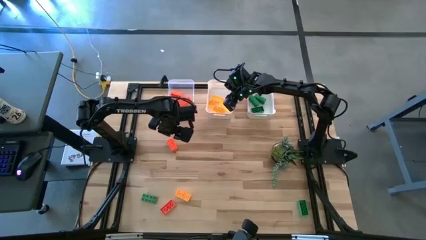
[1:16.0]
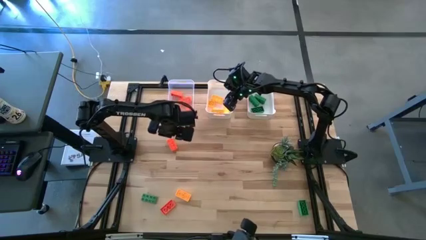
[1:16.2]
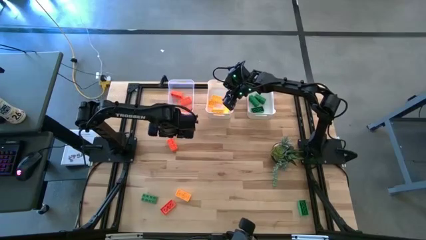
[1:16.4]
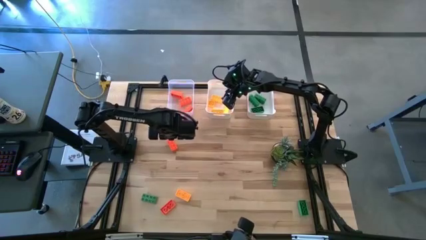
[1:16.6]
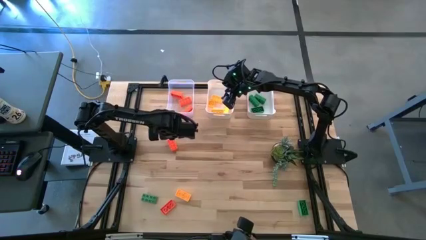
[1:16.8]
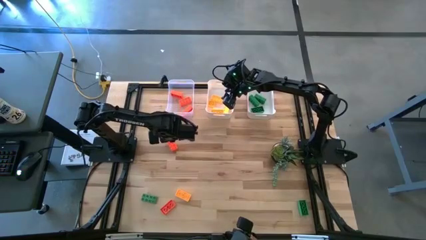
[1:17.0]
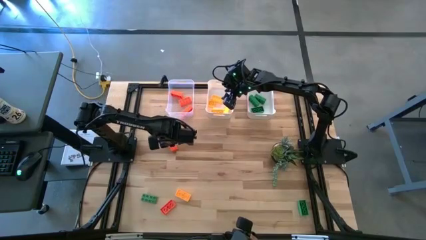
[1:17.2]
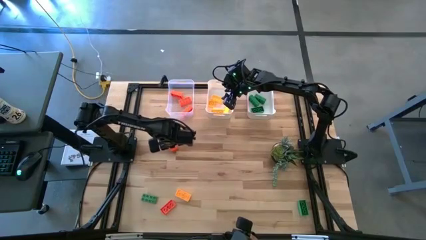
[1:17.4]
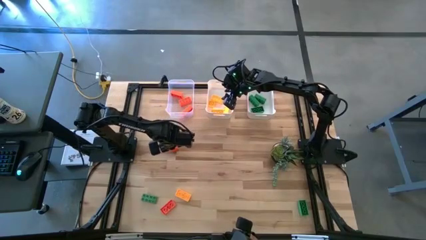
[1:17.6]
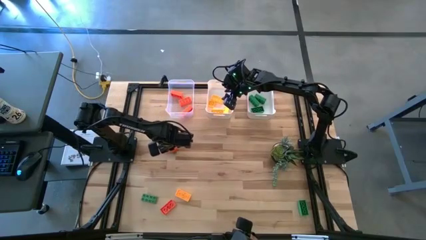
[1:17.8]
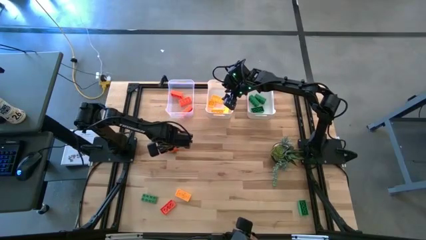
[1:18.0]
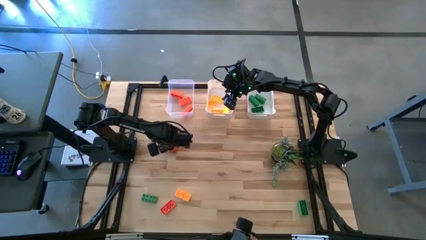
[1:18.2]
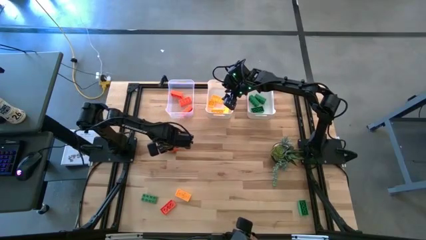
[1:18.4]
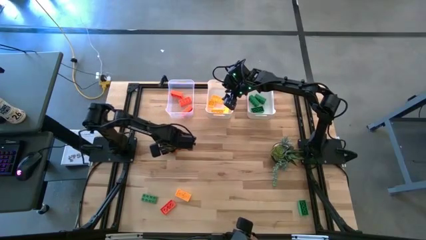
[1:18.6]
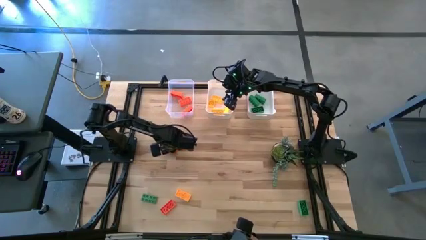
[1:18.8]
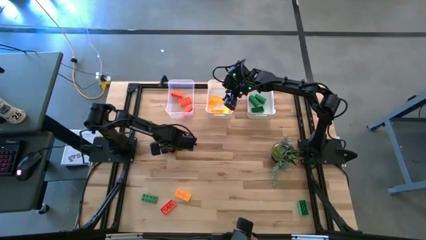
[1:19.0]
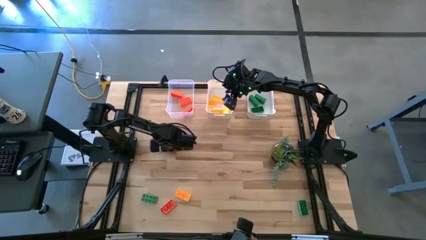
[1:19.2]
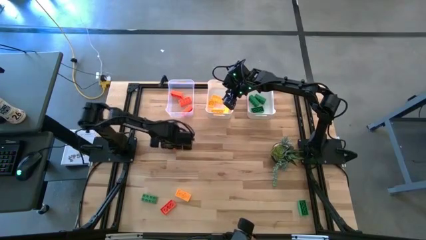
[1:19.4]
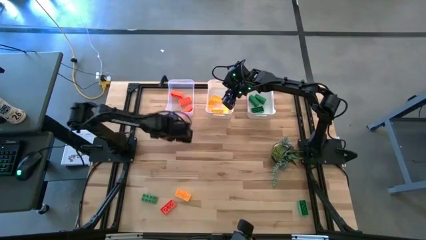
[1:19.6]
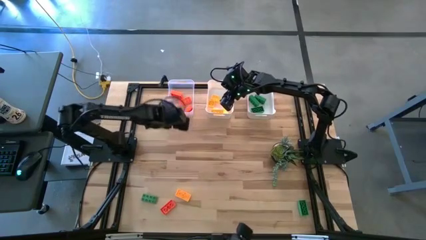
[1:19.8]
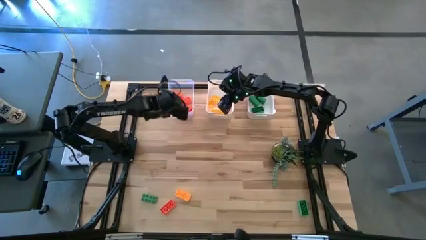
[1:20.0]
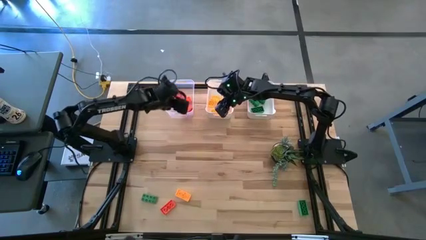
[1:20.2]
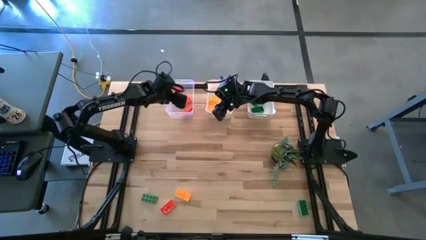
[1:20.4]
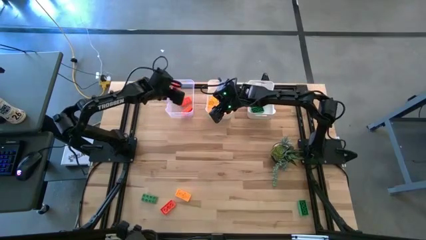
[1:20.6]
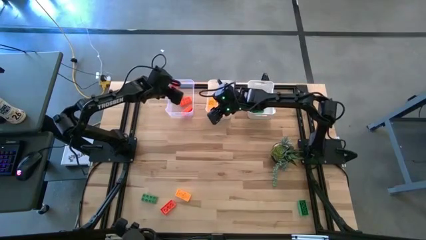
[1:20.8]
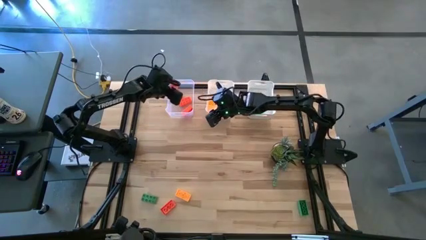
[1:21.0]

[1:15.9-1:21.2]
Task: Sort & place blocks by color
Put the orange game piece into the transparent bin

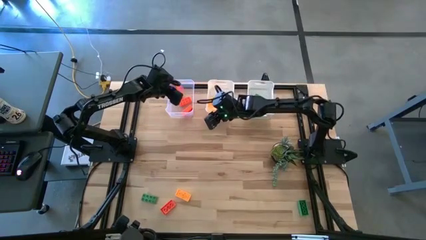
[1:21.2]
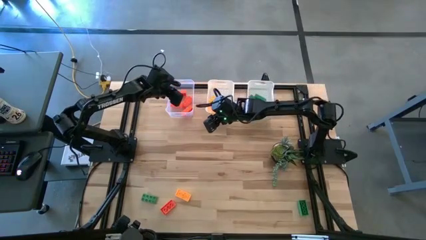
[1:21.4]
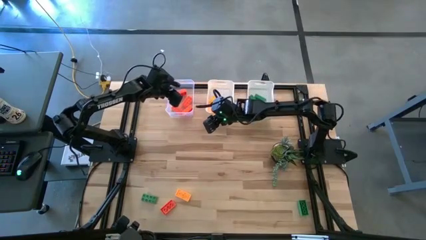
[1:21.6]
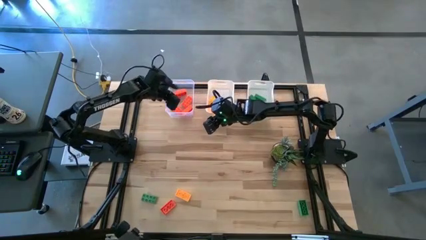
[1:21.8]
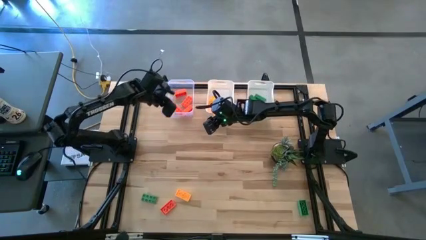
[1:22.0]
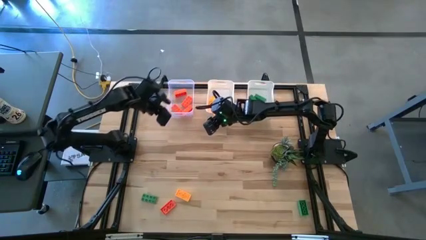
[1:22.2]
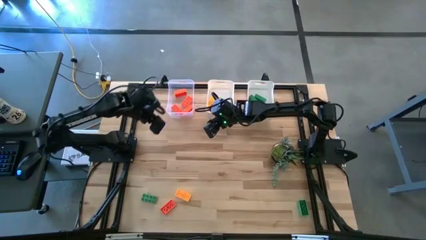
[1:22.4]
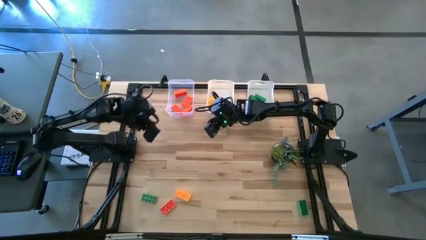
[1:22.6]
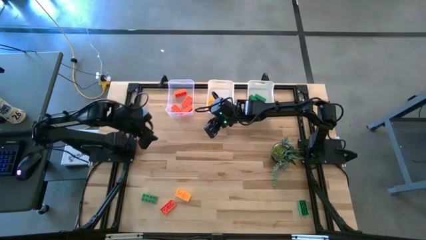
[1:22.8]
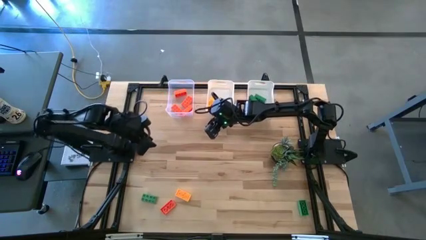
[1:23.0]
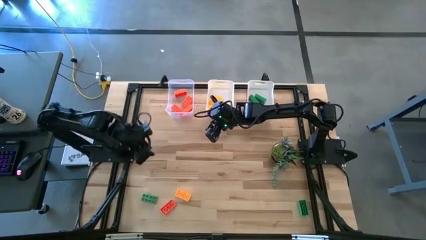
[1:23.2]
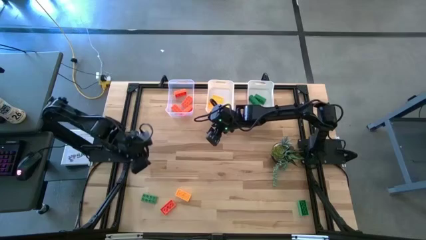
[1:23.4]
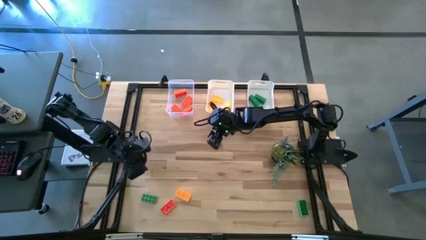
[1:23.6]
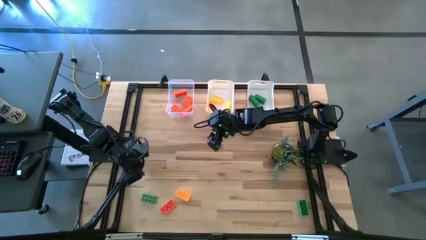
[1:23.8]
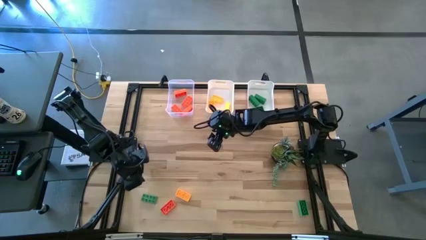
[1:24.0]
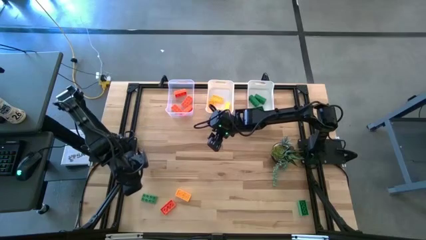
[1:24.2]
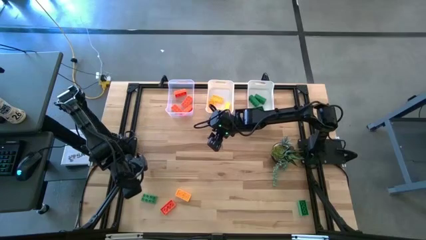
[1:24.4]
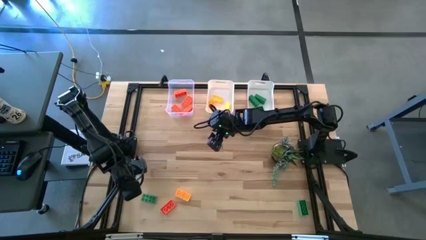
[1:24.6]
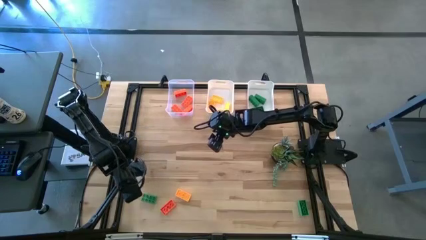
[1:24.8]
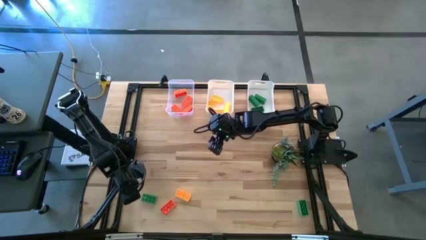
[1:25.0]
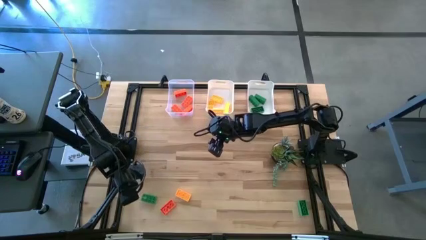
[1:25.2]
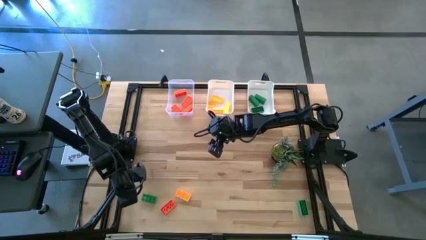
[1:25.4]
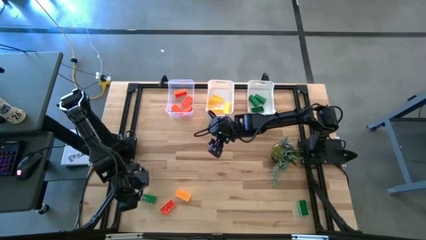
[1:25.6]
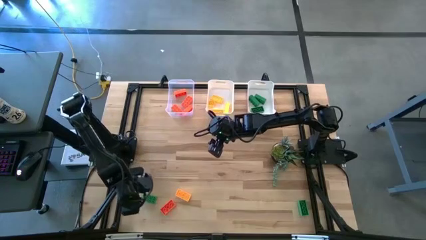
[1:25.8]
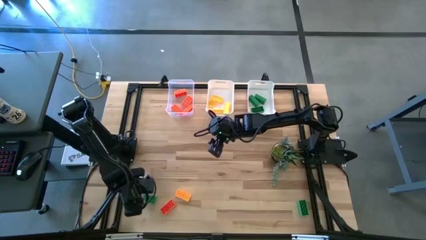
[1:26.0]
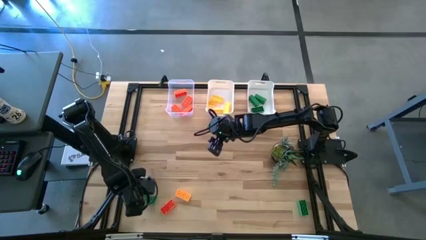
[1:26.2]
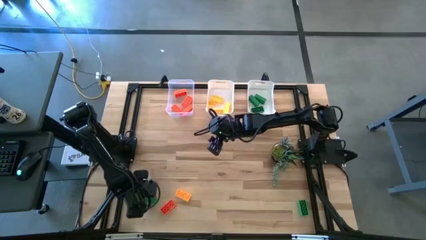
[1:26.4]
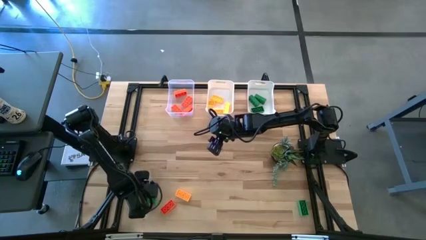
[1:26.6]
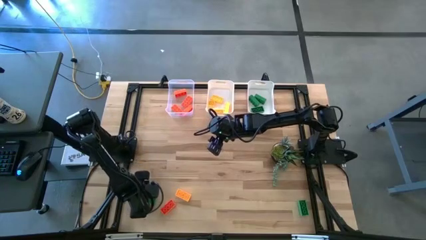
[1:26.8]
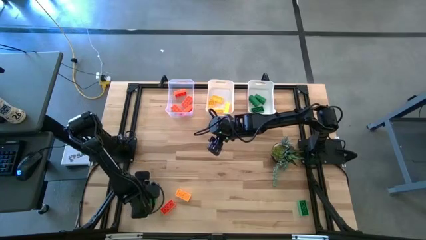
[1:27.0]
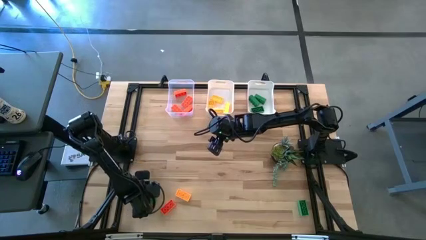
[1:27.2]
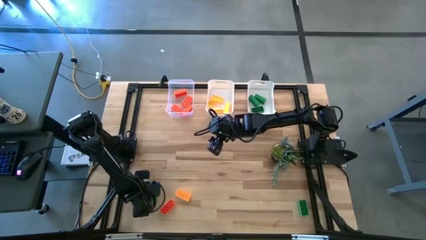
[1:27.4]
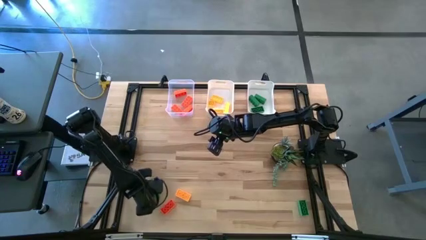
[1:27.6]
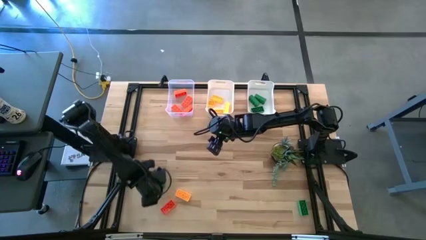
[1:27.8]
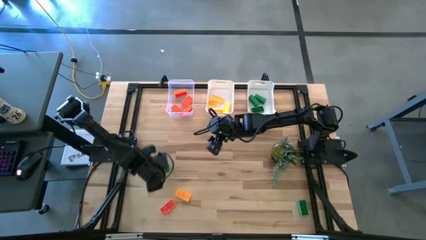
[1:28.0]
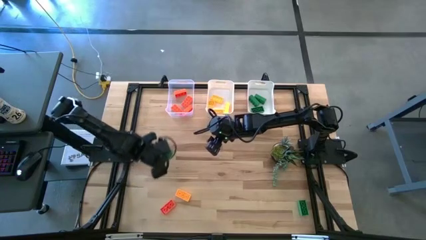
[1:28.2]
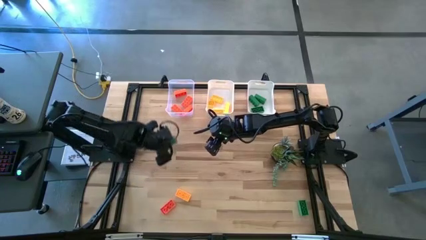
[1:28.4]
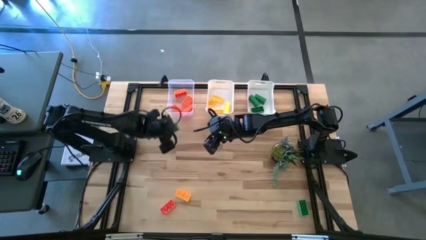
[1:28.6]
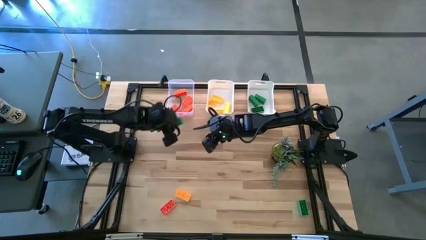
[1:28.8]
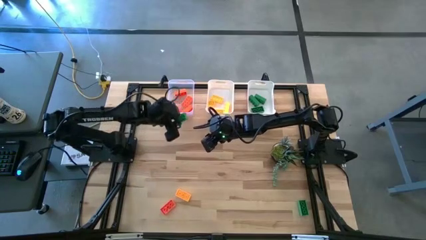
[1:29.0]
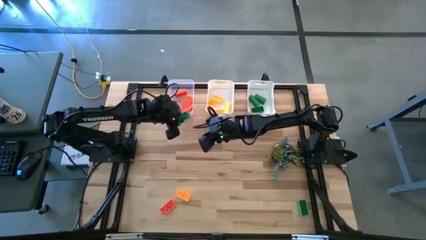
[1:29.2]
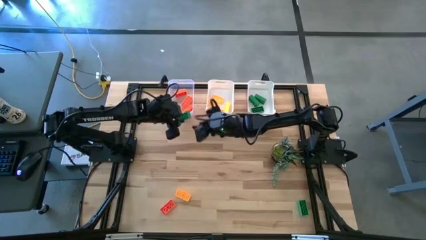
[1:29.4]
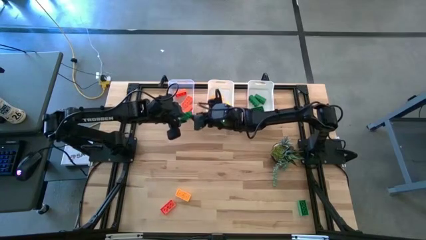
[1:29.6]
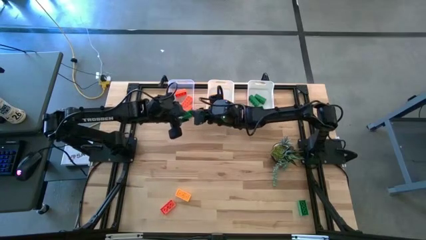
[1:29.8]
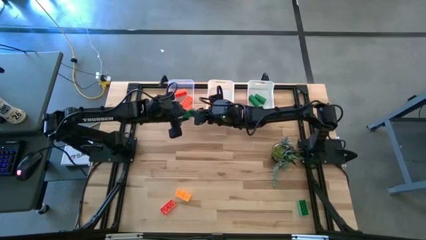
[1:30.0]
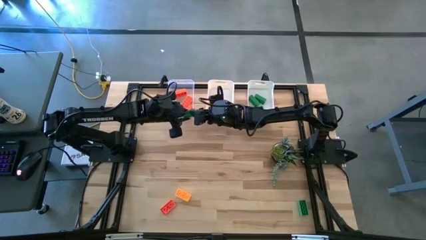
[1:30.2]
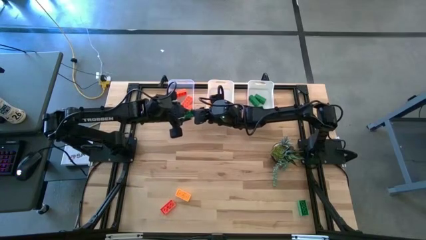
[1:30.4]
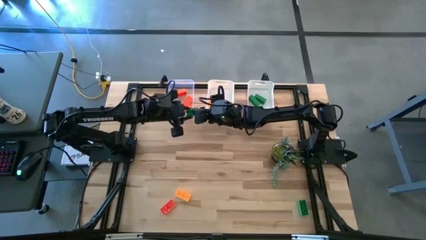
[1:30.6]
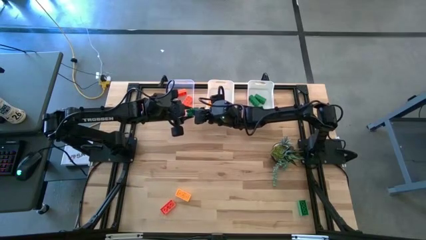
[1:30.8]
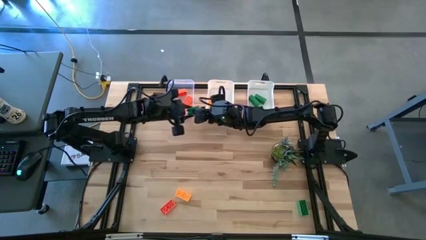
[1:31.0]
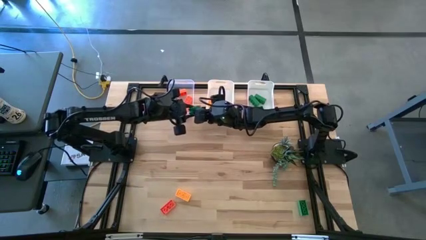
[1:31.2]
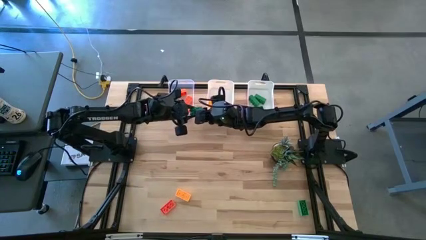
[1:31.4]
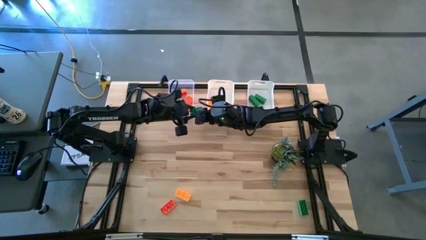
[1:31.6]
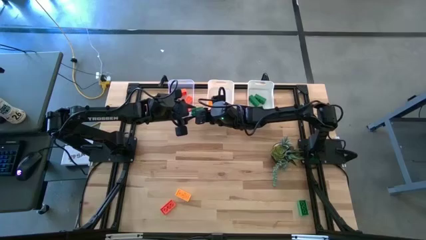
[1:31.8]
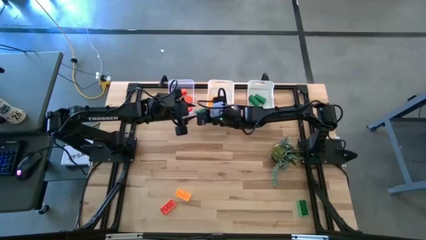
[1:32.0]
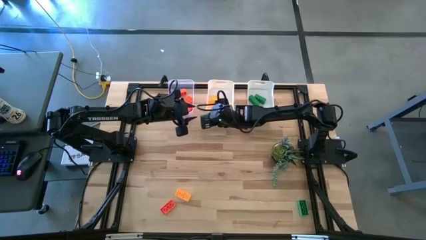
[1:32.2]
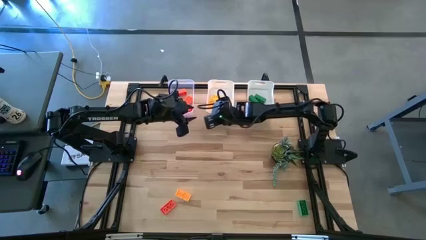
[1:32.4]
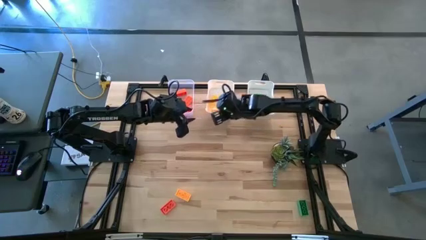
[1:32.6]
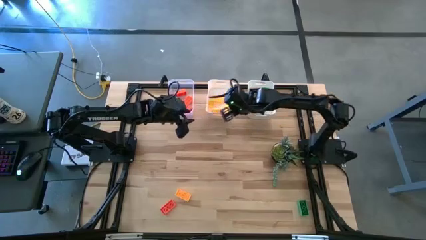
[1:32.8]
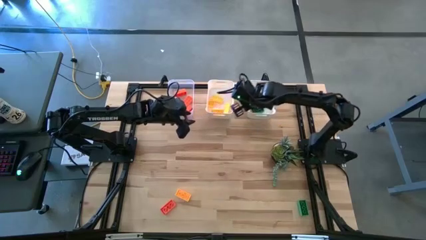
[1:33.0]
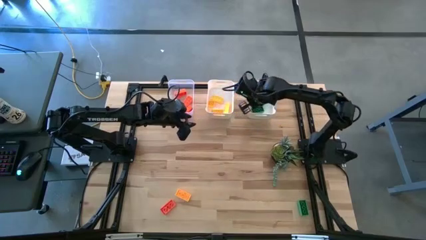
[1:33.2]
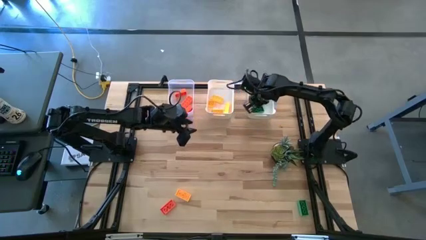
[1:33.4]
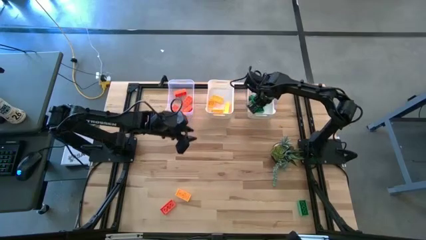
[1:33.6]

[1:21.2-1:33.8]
Put the green game piece into the right white bin
